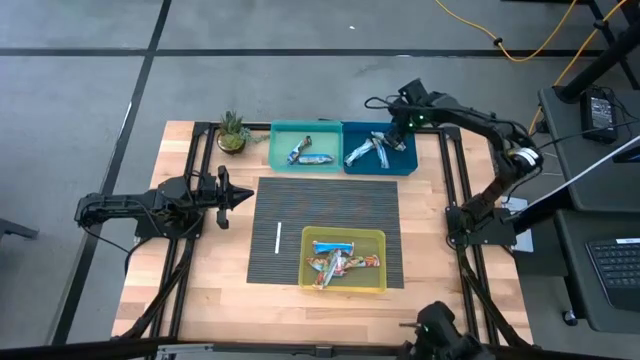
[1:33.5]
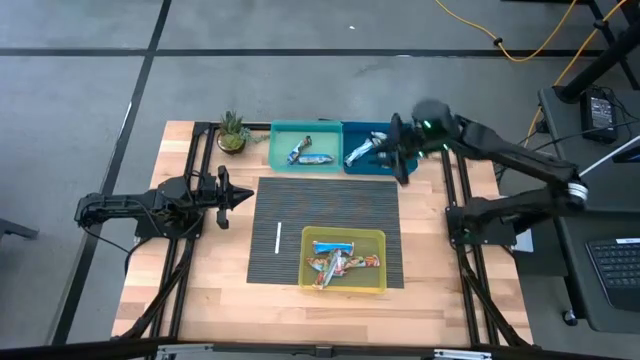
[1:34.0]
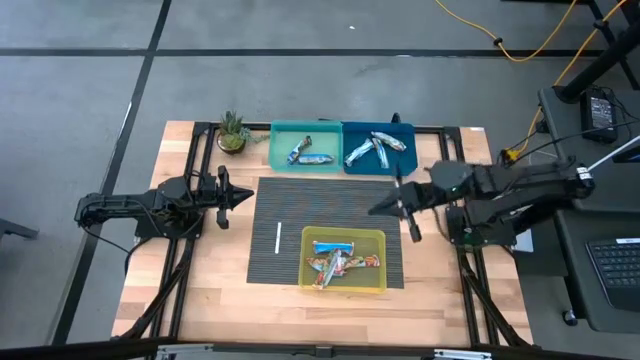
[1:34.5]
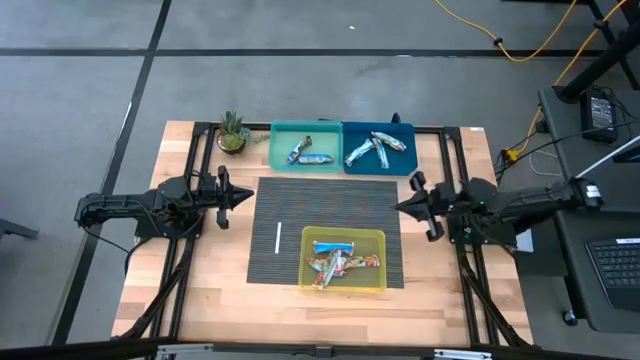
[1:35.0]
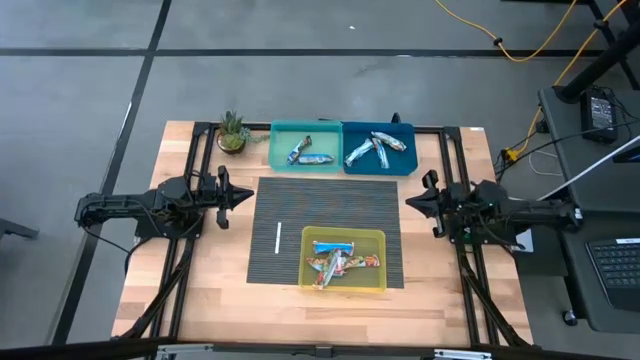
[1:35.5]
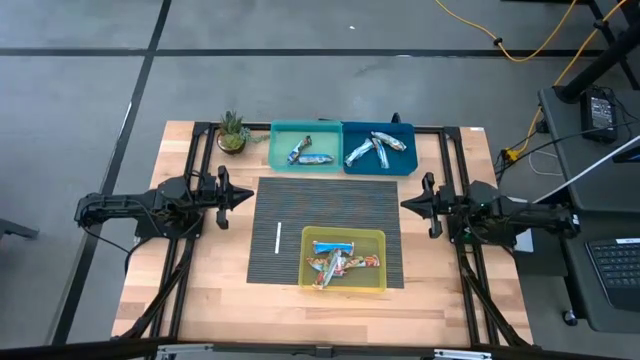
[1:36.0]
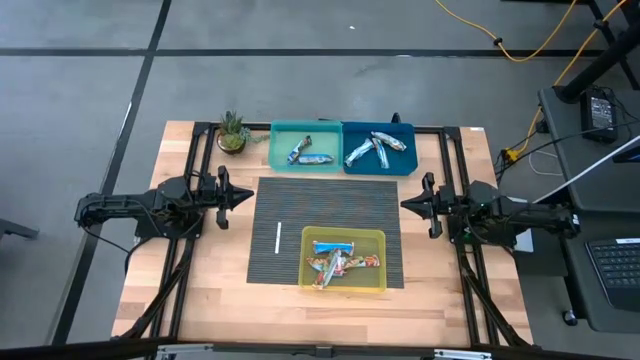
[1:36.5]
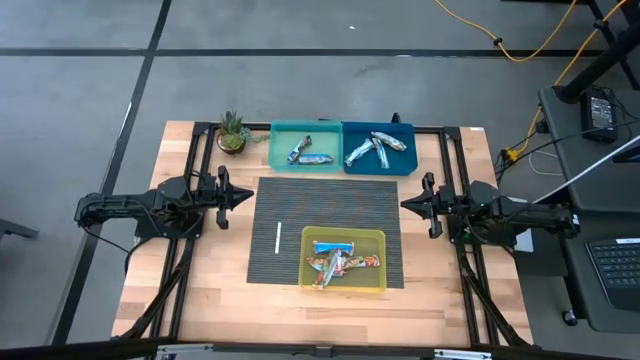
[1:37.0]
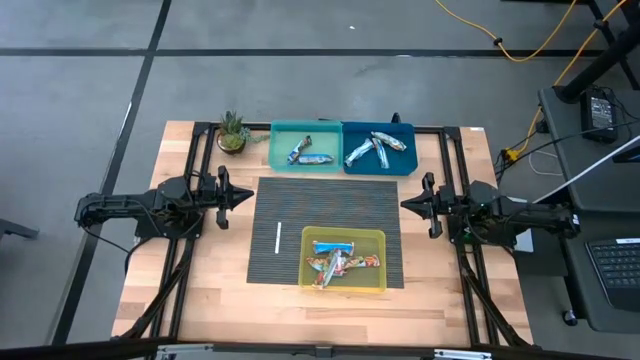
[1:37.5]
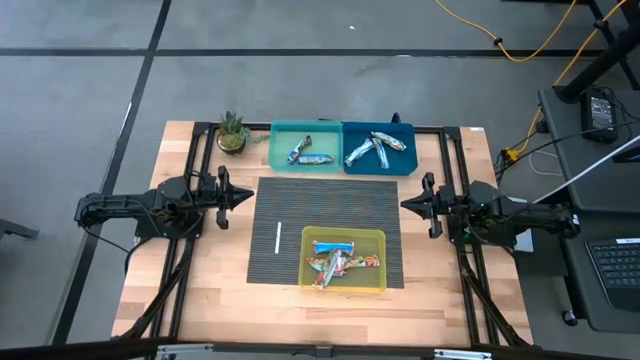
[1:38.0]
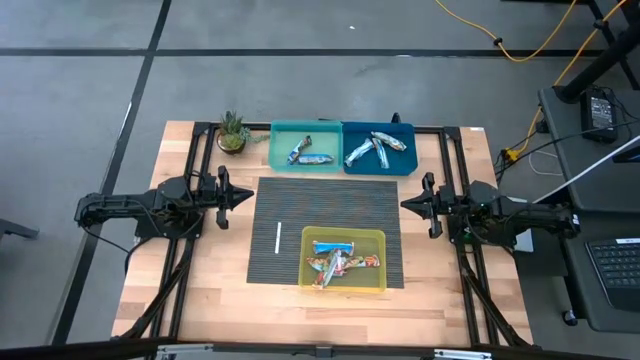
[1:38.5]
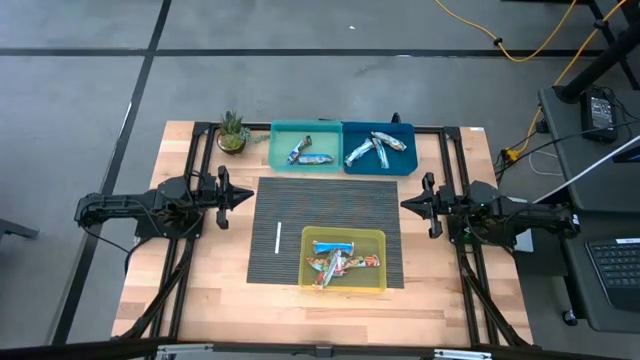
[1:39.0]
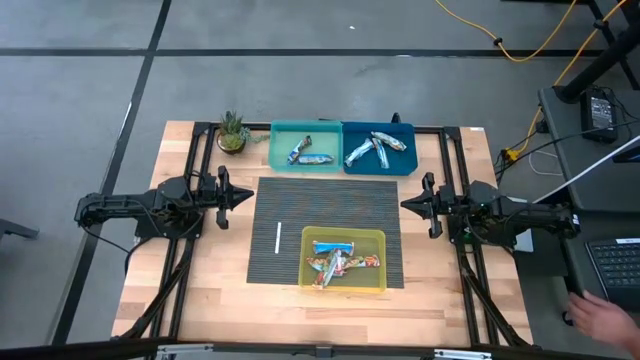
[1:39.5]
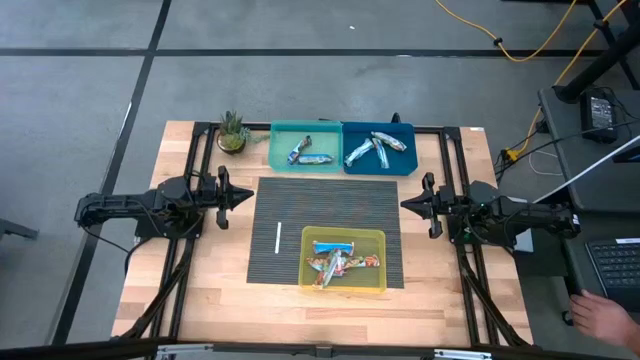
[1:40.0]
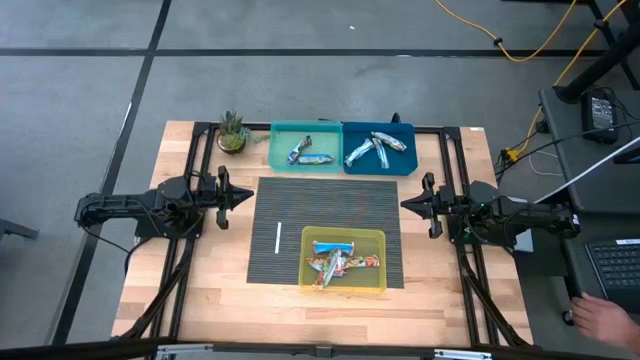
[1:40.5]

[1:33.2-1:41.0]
Task: Pick and place Granola Bars by type
Return to Home Position

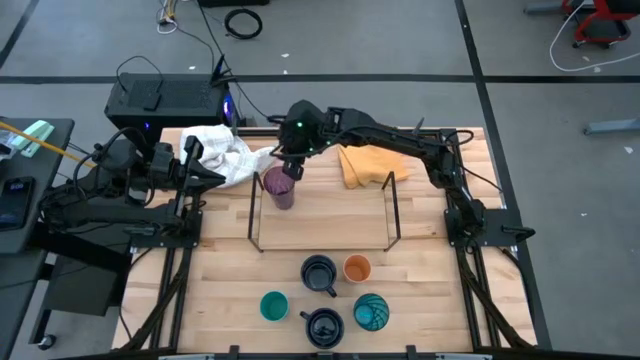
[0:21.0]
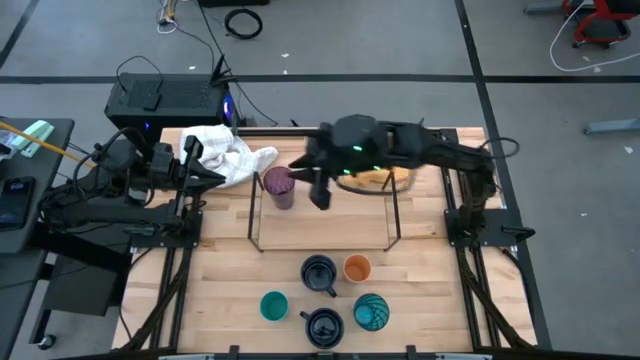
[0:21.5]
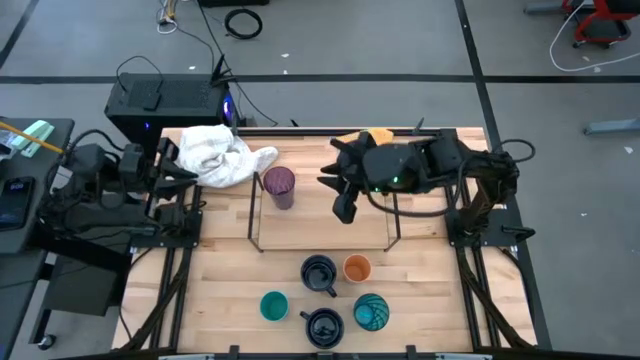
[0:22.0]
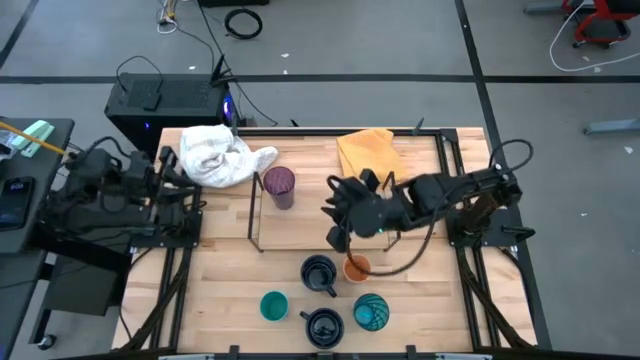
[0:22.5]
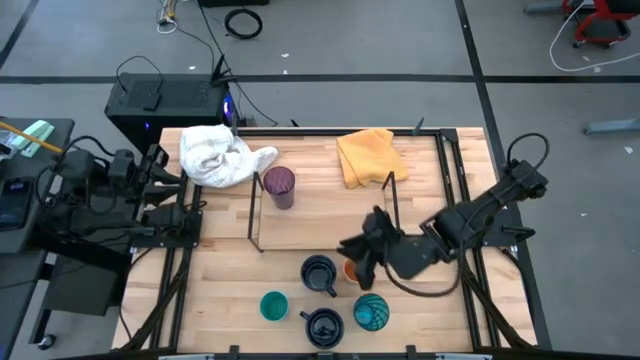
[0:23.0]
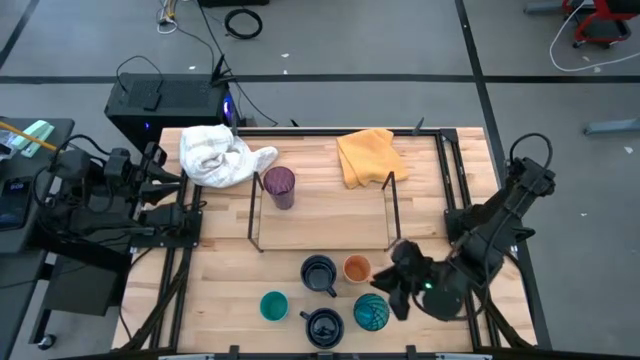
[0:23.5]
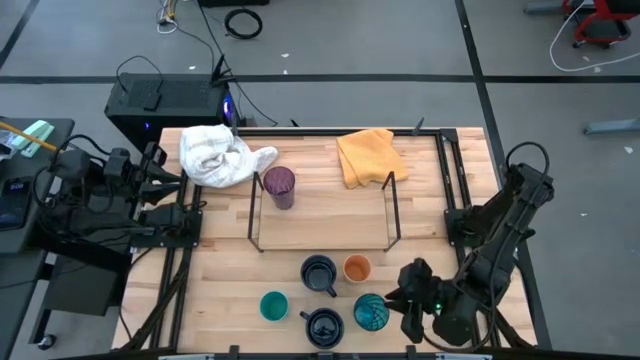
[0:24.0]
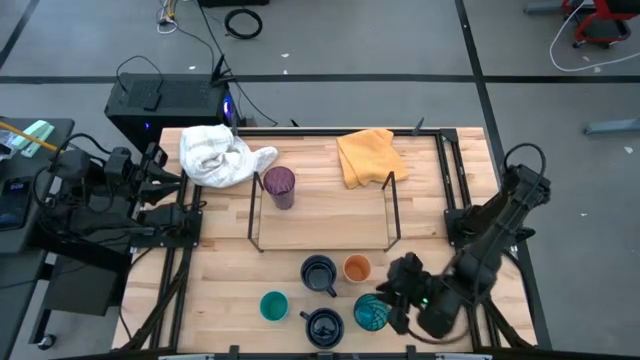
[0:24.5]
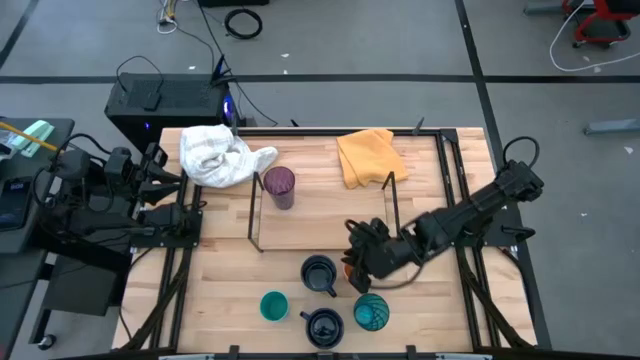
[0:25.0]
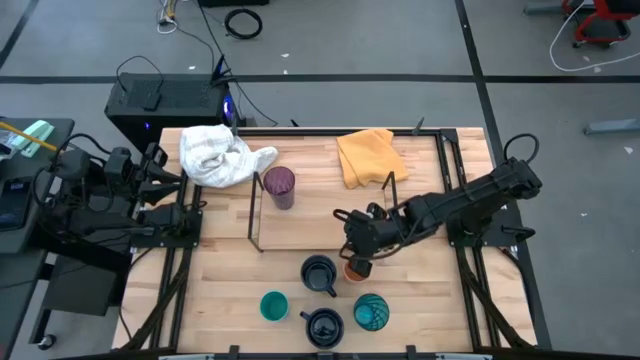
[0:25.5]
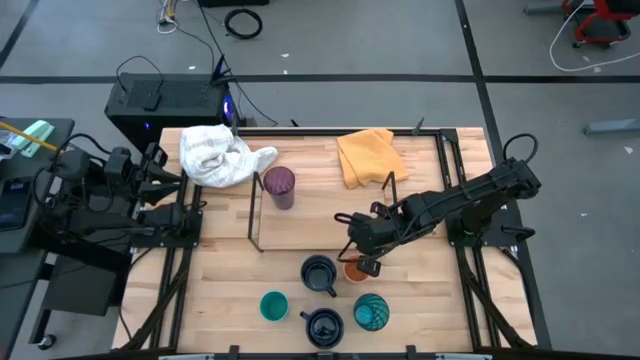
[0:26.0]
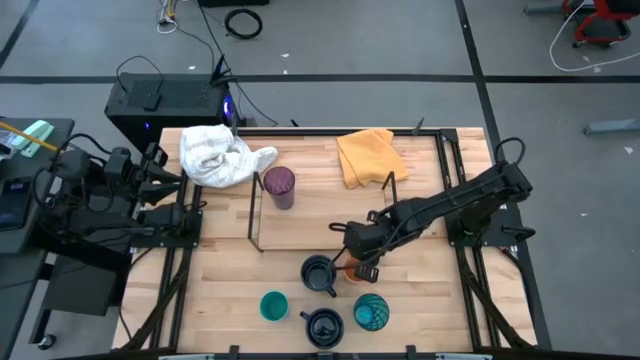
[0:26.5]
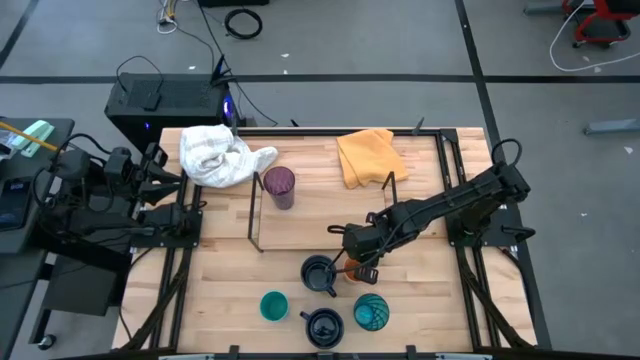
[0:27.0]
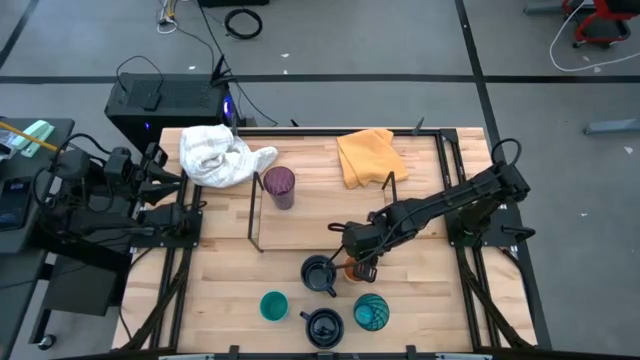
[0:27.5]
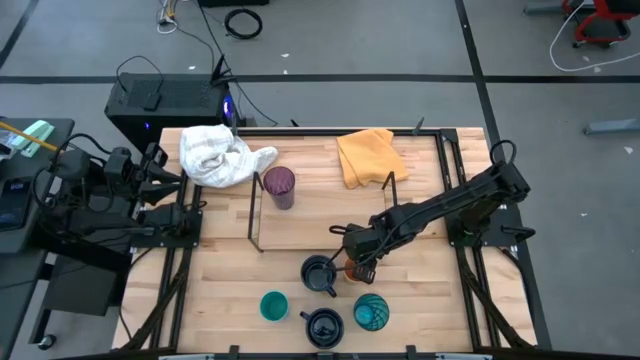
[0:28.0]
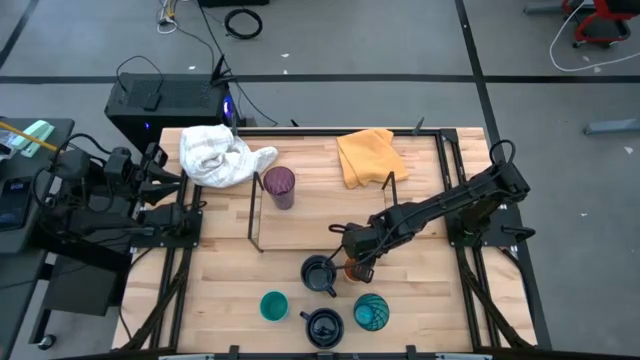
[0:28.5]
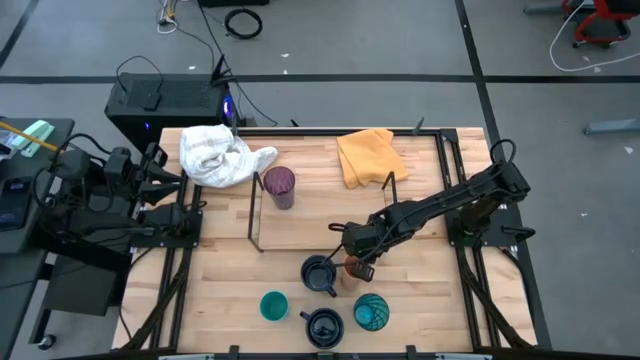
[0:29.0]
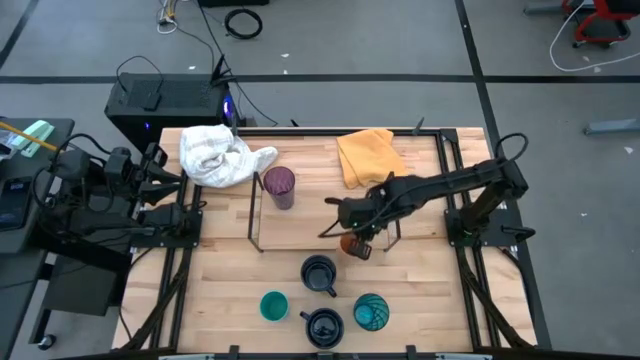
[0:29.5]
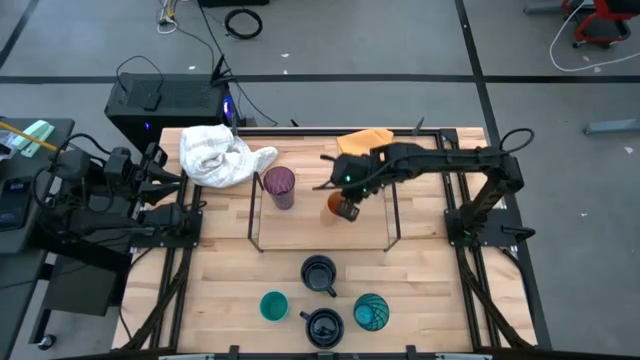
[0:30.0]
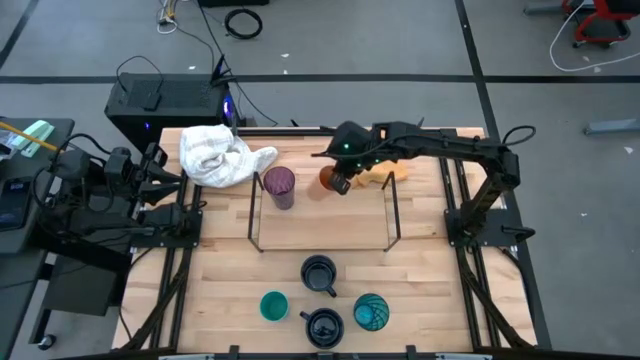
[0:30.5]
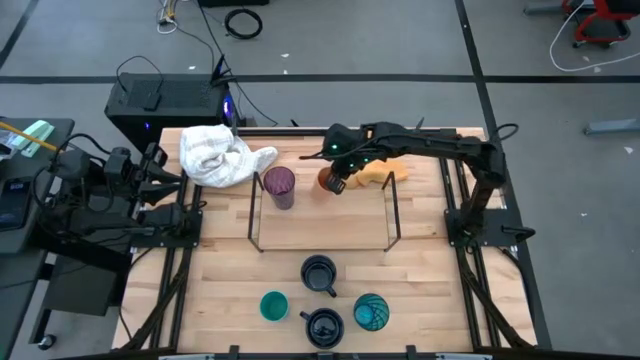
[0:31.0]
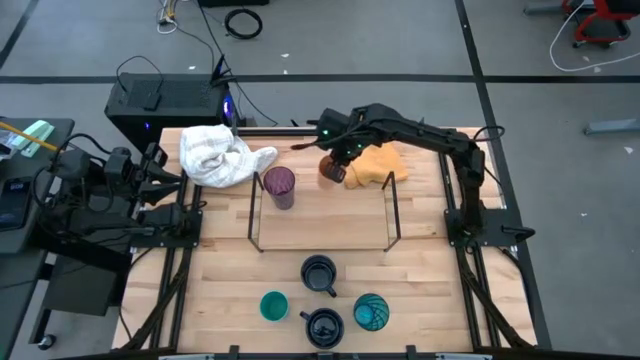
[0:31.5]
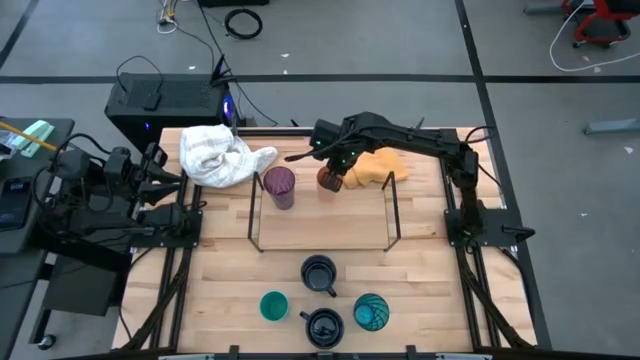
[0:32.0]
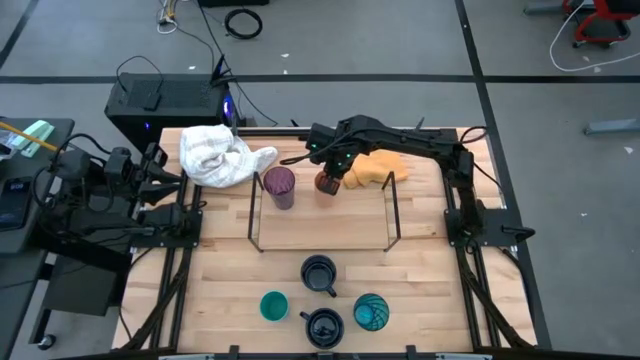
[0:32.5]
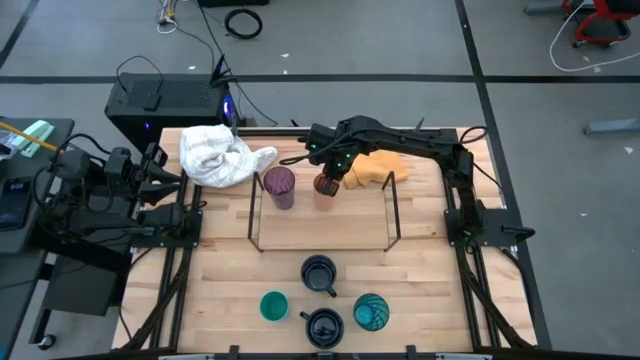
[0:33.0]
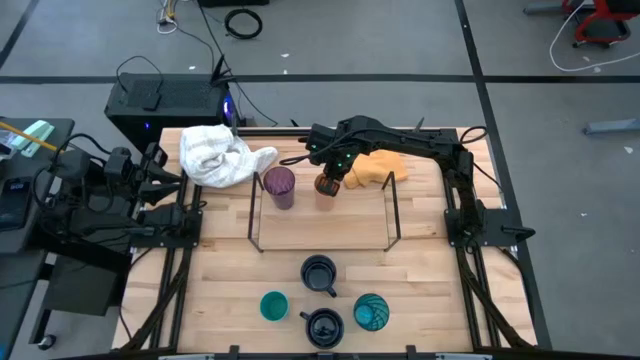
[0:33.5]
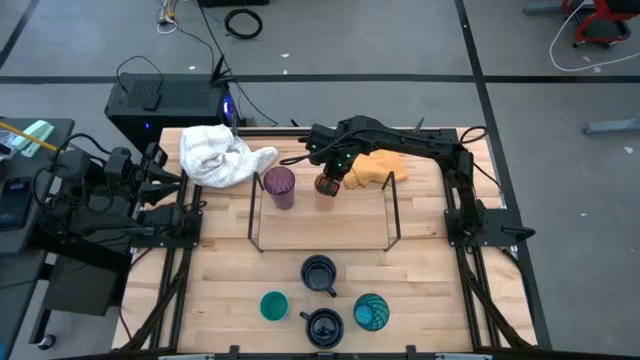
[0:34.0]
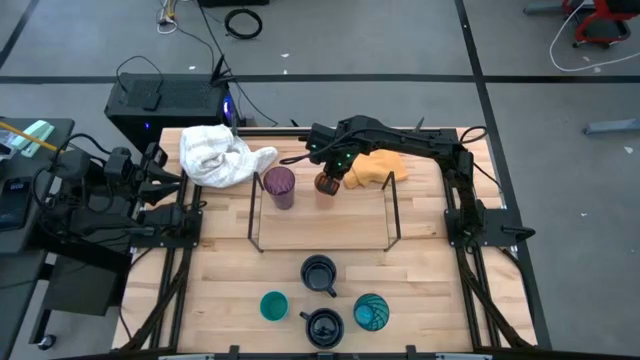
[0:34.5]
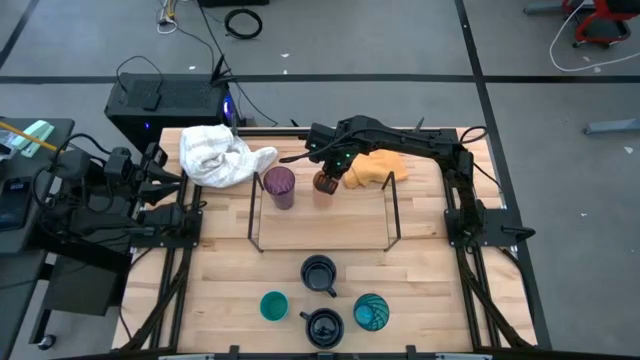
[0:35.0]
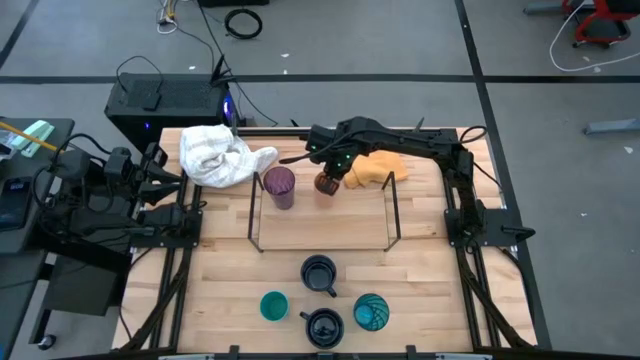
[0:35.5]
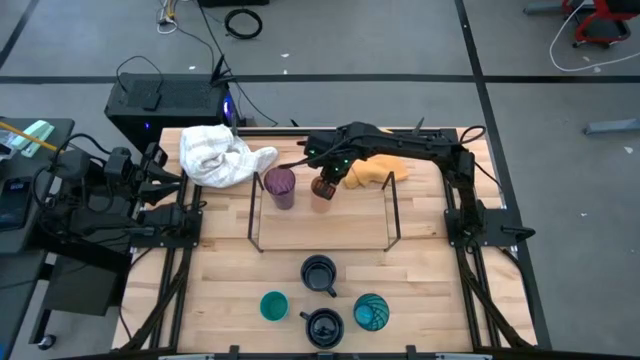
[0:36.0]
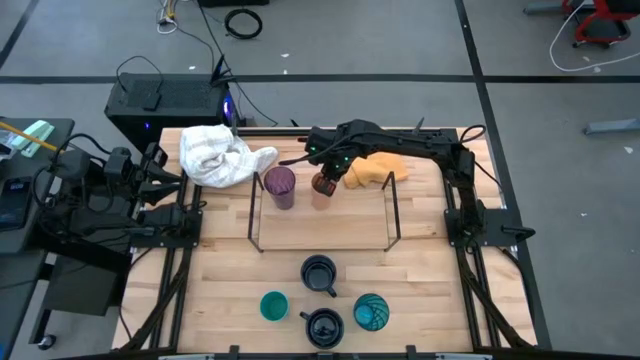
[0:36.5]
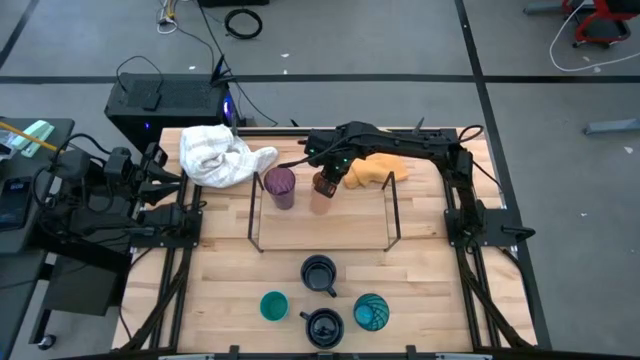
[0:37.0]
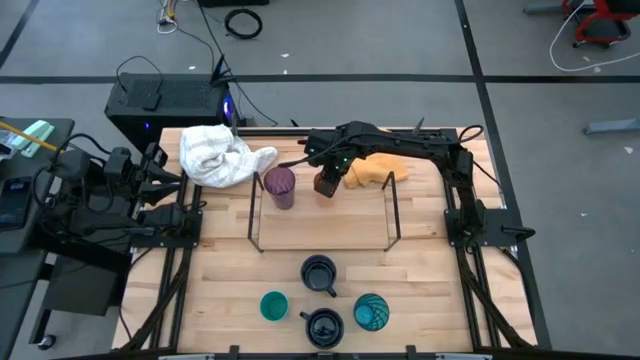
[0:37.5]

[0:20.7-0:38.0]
Task: Stack small to large cups/mugs on shelf
Put the orange cup on the shelf
